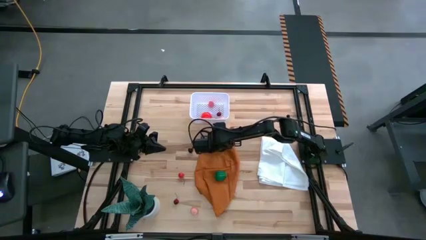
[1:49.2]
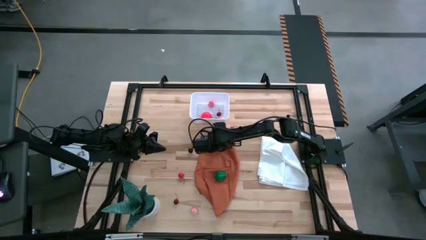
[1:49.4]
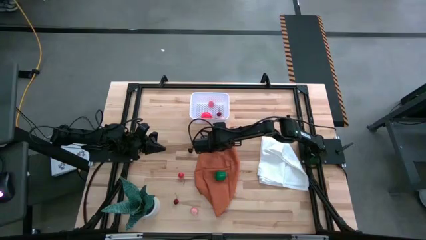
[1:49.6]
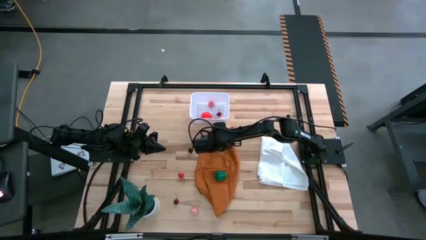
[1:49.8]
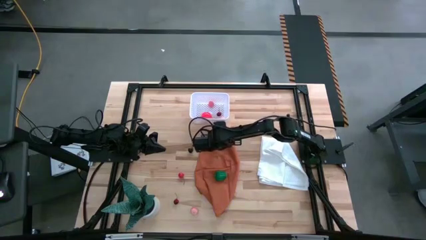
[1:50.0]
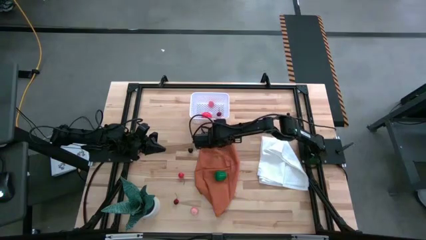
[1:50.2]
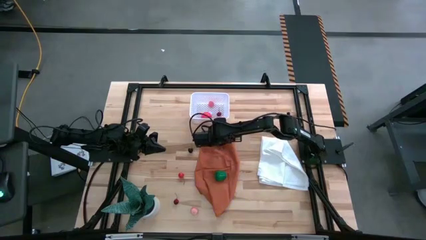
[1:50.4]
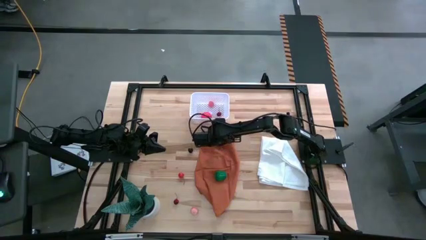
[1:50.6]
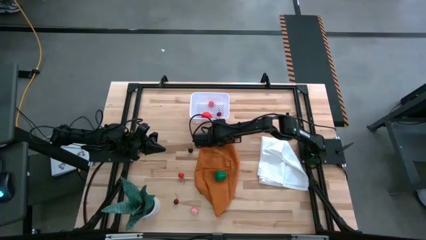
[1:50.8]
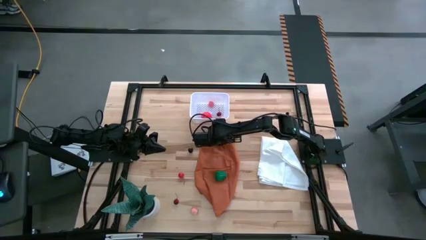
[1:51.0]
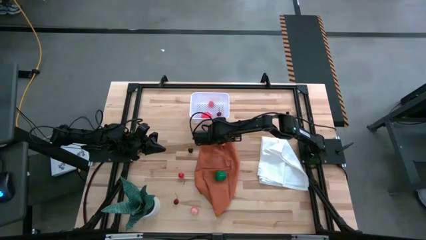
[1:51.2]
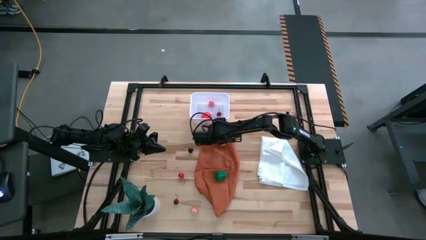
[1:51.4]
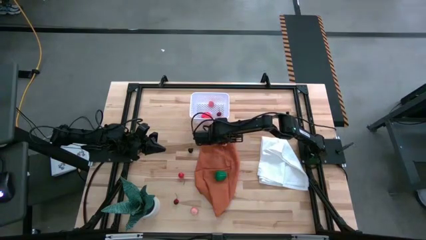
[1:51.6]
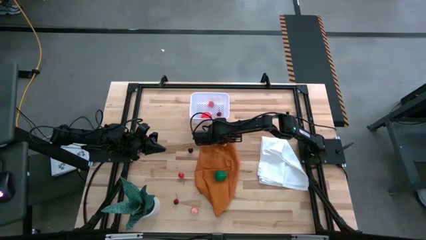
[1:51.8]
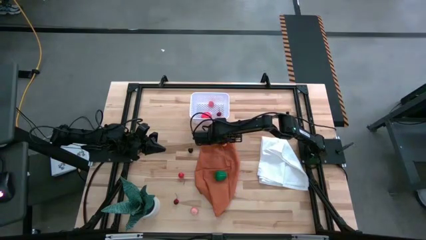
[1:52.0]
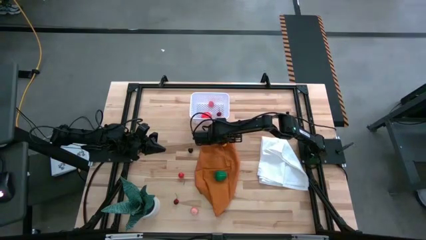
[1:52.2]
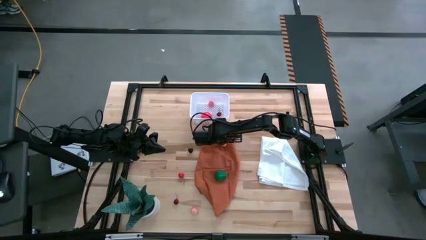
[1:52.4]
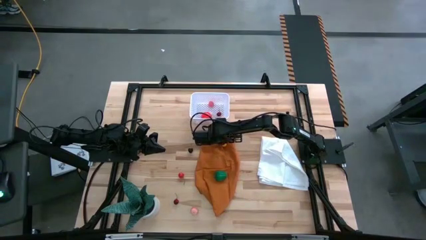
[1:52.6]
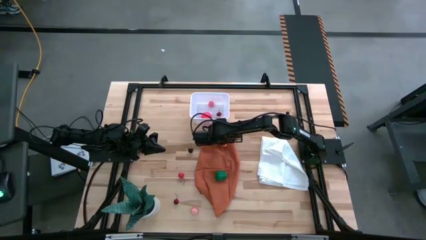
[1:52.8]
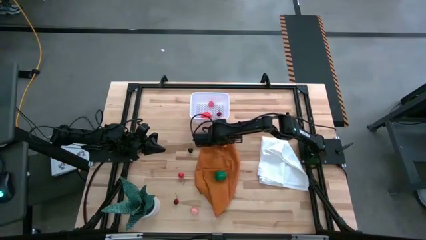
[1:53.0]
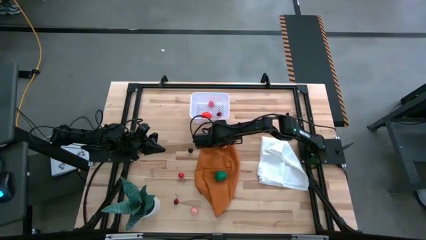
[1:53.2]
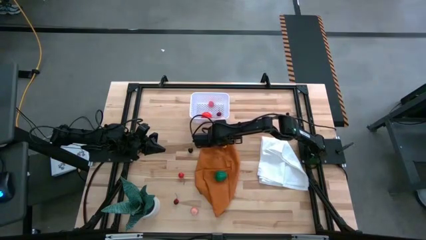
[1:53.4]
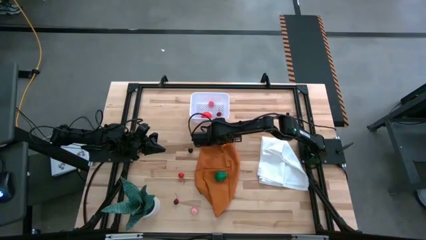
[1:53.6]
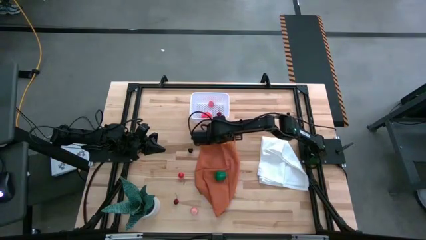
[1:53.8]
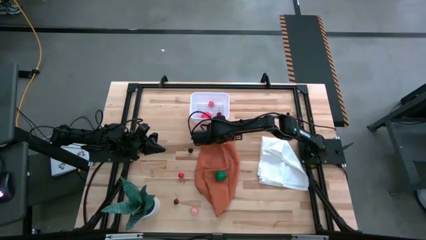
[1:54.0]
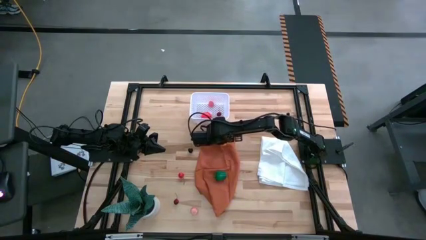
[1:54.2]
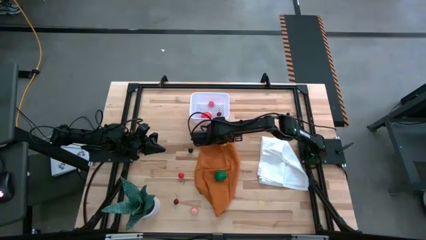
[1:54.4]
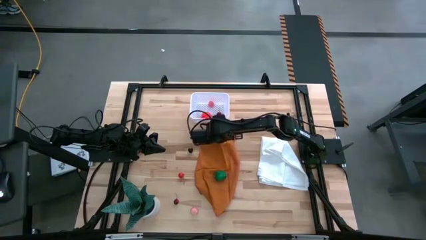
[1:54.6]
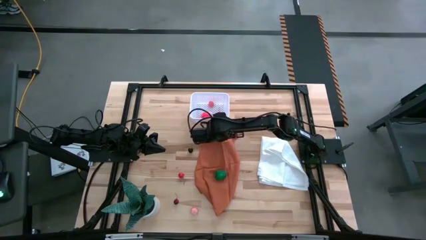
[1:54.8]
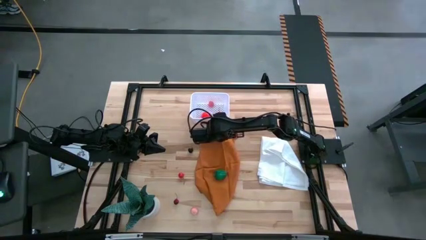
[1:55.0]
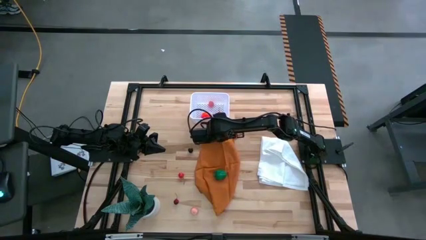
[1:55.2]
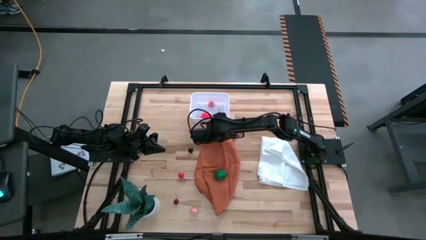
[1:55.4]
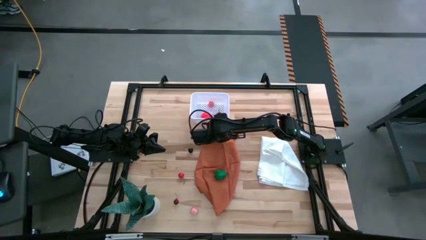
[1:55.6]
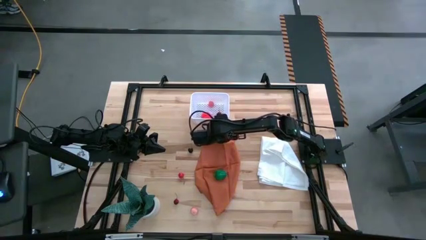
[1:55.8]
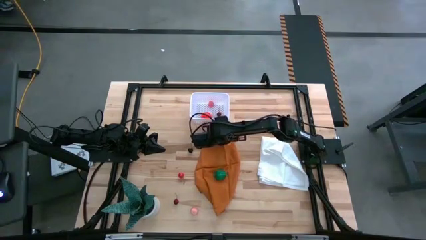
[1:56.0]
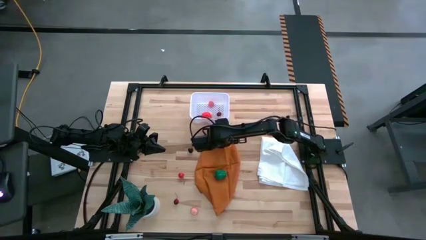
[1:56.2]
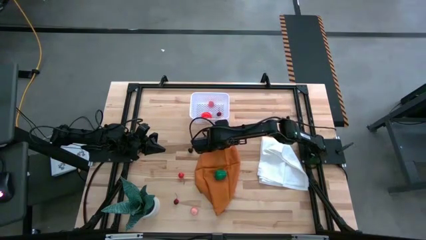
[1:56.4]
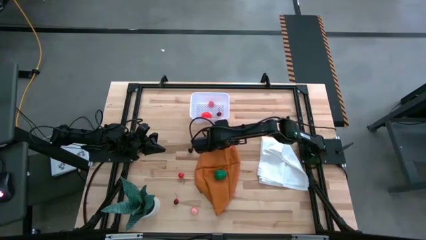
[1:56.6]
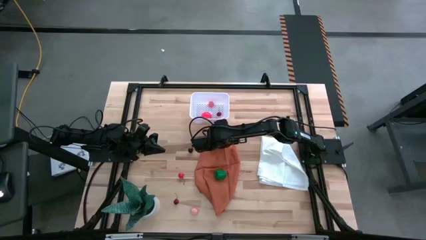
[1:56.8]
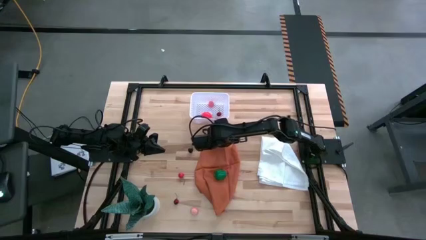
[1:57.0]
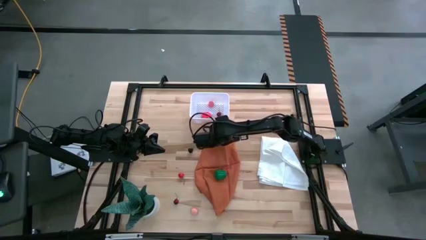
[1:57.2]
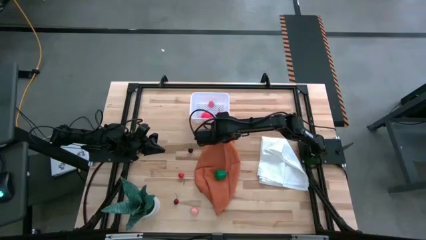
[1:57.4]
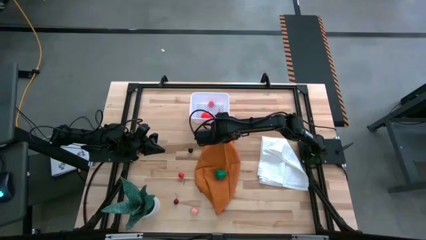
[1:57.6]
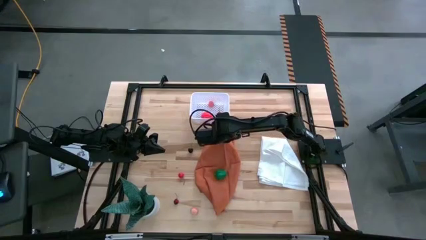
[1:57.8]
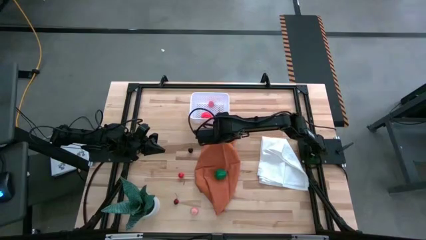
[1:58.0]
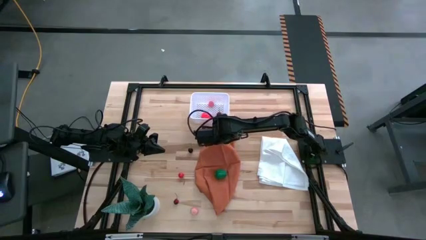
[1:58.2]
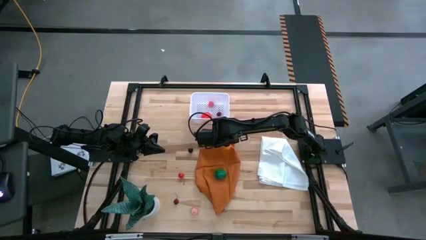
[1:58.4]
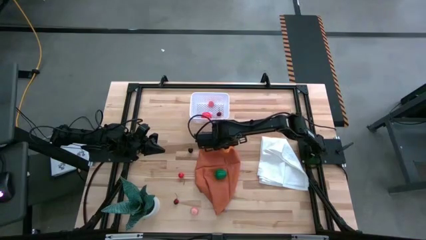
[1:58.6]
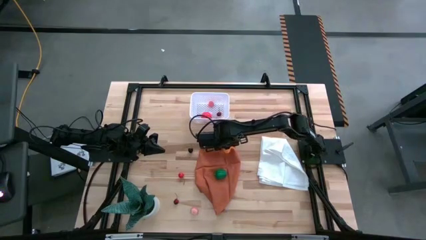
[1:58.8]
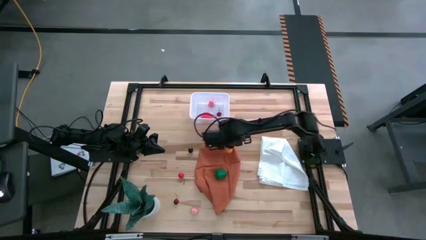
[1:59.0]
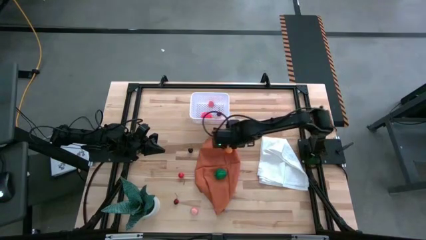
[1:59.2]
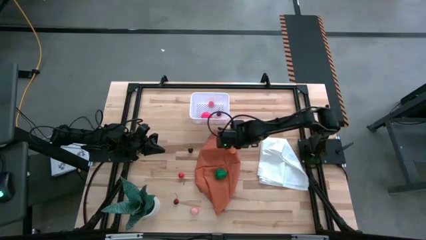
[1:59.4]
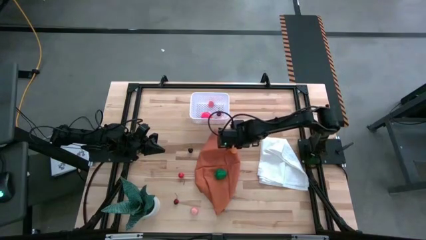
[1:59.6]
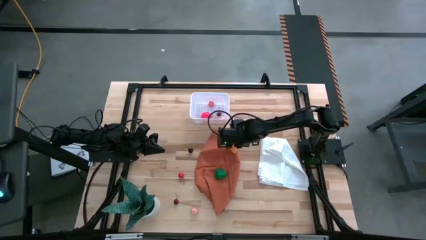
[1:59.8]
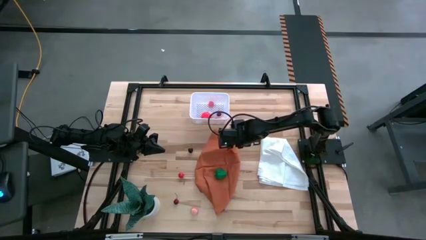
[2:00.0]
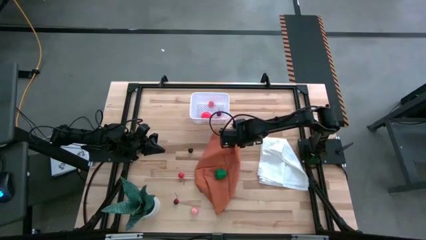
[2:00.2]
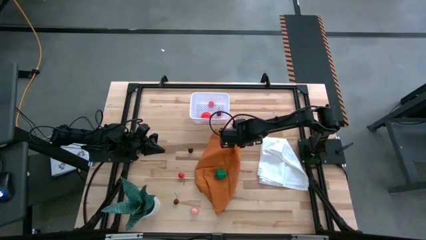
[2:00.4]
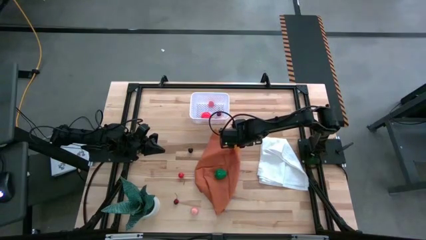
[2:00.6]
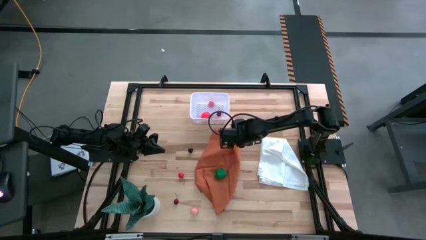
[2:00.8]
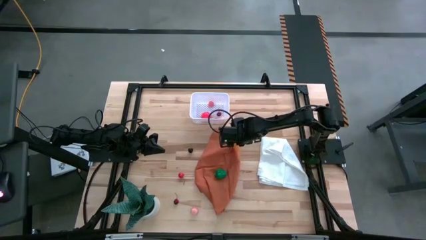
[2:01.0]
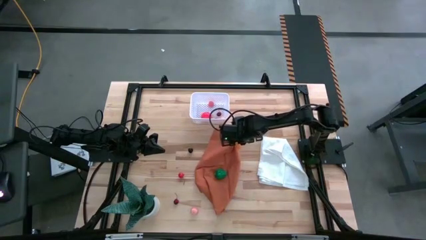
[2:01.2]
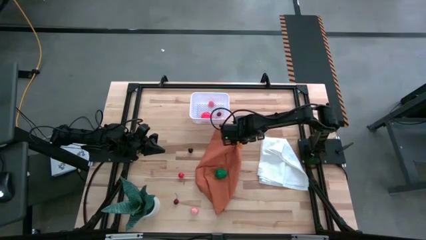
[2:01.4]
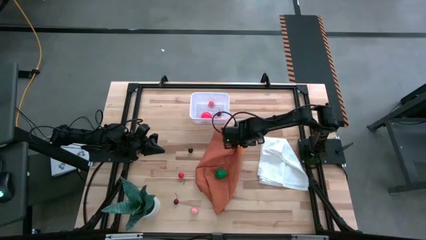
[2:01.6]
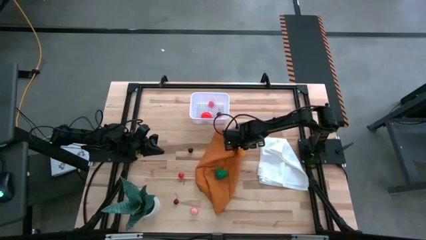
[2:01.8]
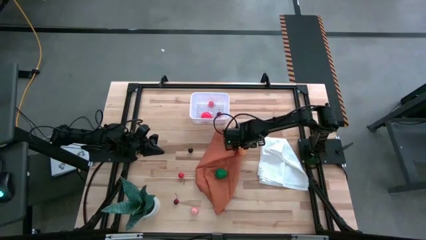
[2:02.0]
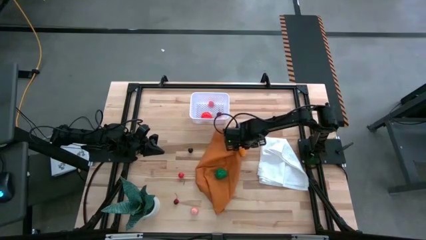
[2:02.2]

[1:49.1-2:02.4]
Task: Pick and placing Produce into tupperware
Put the orange croissant into the white basket
